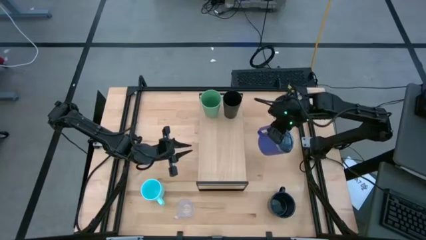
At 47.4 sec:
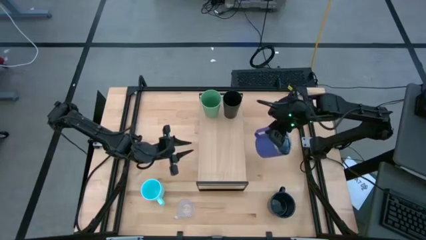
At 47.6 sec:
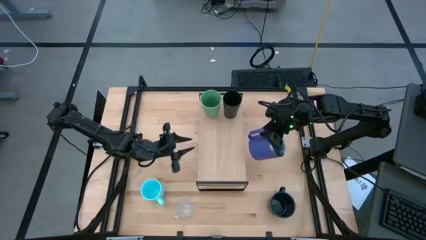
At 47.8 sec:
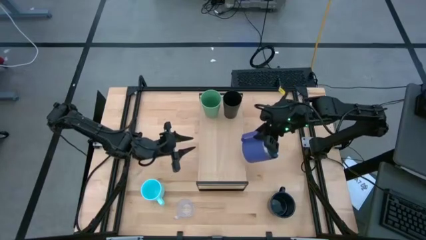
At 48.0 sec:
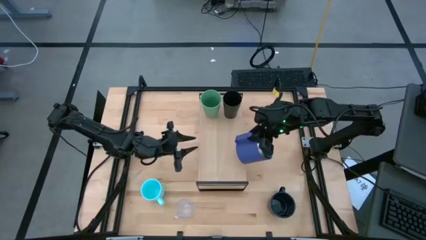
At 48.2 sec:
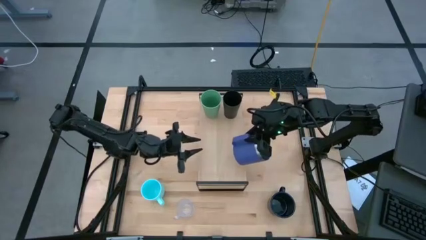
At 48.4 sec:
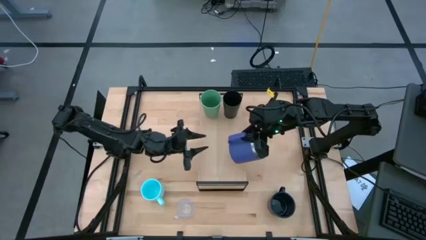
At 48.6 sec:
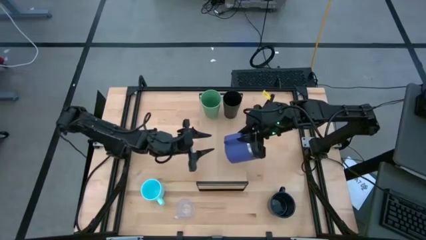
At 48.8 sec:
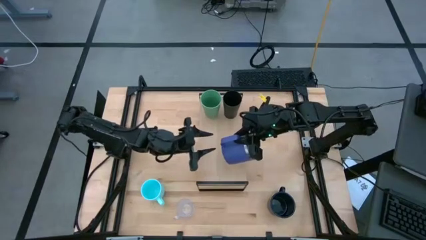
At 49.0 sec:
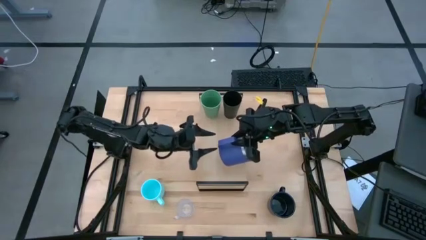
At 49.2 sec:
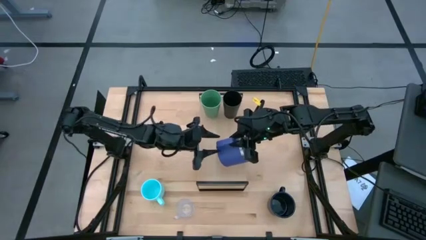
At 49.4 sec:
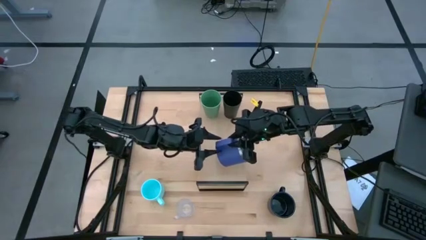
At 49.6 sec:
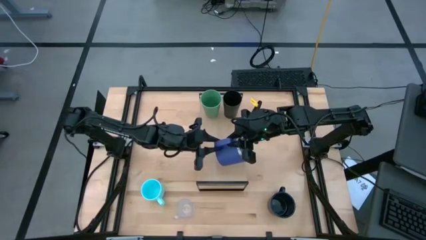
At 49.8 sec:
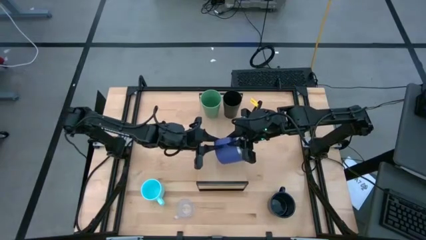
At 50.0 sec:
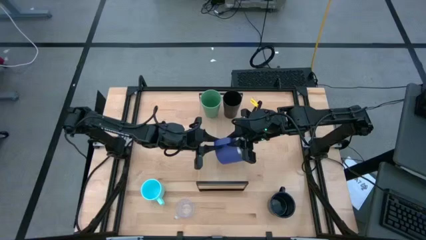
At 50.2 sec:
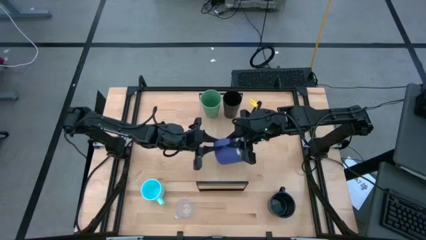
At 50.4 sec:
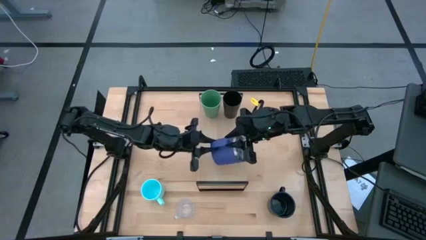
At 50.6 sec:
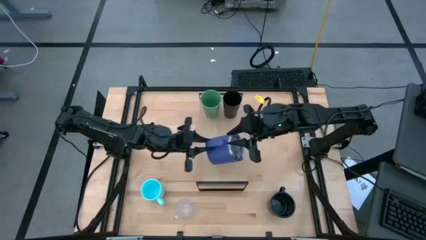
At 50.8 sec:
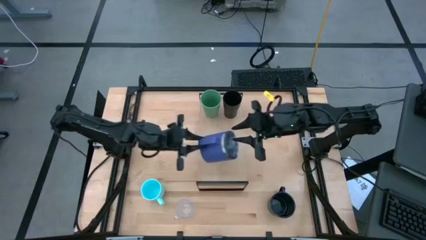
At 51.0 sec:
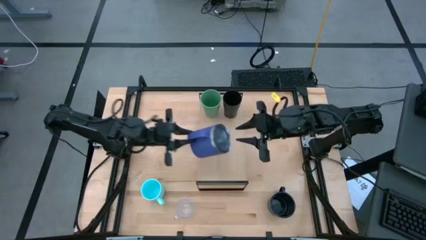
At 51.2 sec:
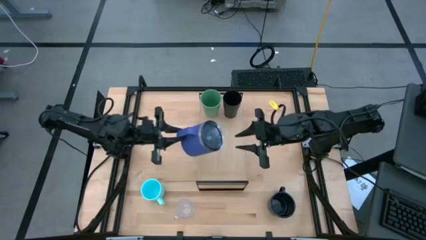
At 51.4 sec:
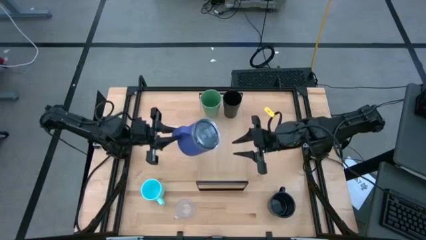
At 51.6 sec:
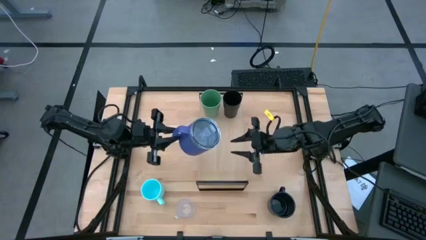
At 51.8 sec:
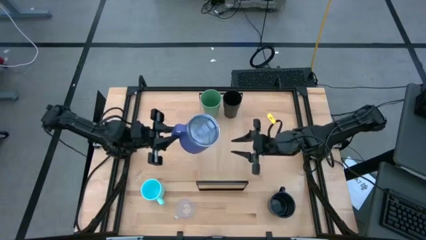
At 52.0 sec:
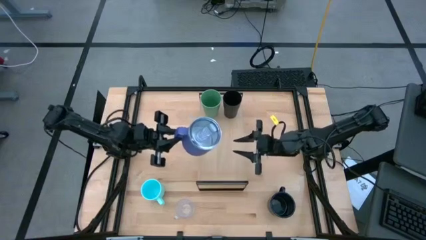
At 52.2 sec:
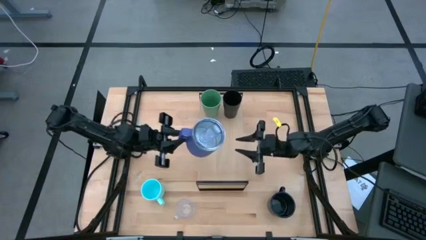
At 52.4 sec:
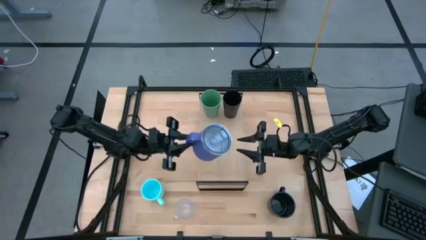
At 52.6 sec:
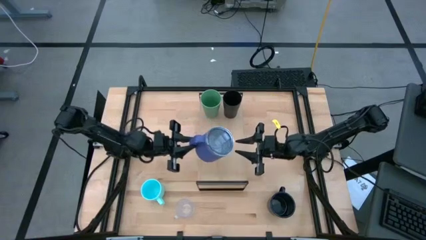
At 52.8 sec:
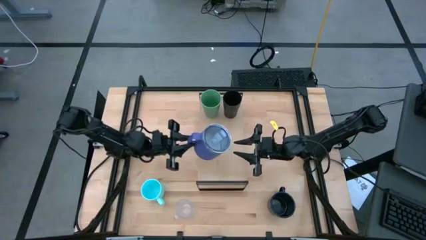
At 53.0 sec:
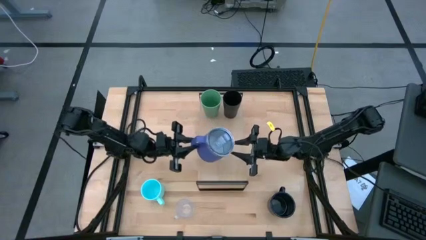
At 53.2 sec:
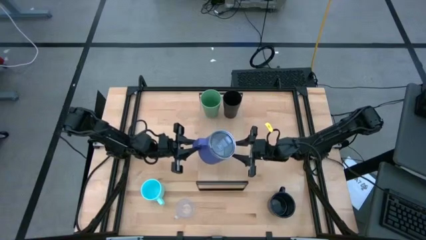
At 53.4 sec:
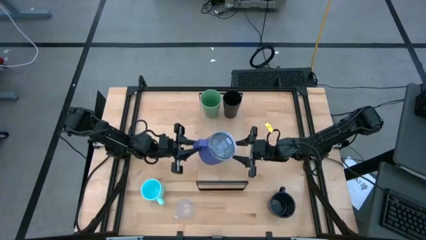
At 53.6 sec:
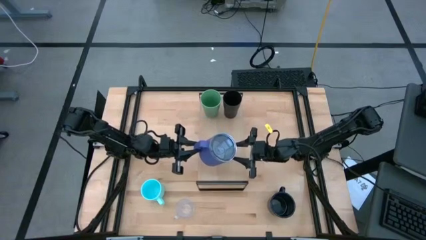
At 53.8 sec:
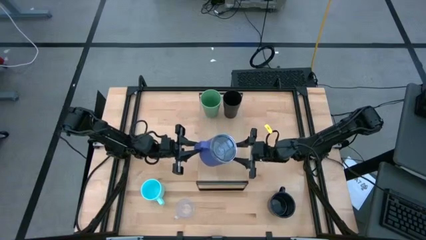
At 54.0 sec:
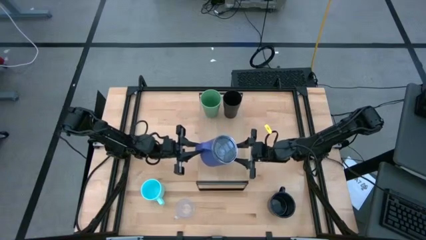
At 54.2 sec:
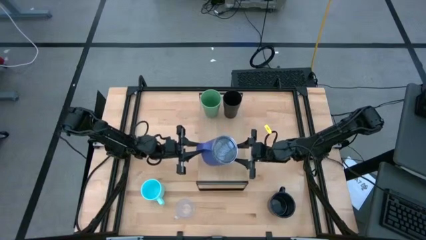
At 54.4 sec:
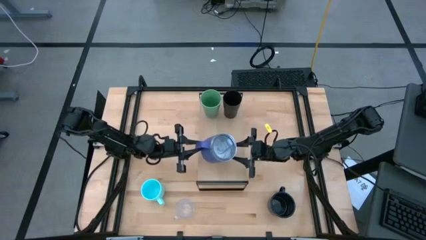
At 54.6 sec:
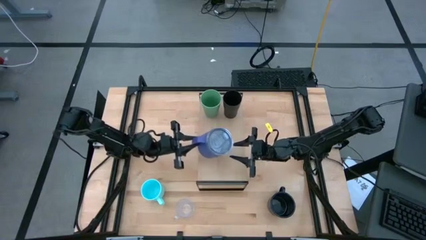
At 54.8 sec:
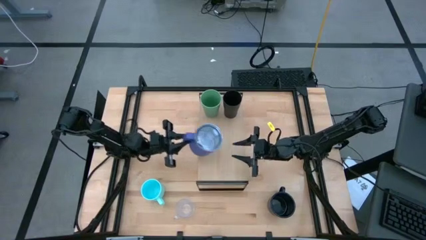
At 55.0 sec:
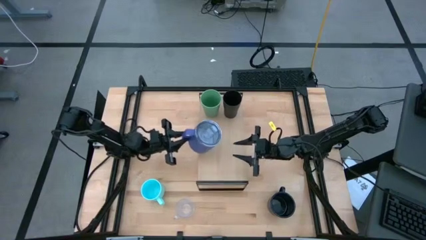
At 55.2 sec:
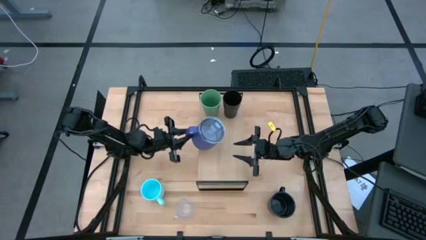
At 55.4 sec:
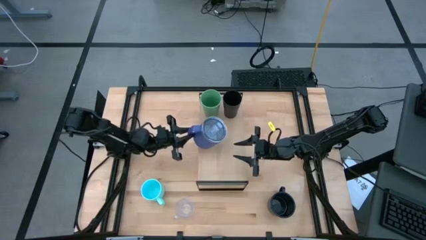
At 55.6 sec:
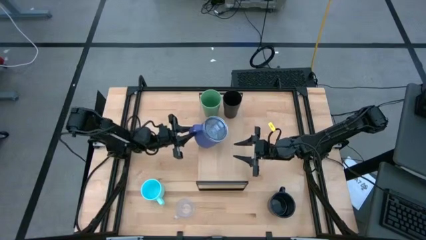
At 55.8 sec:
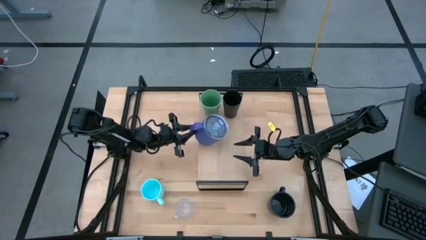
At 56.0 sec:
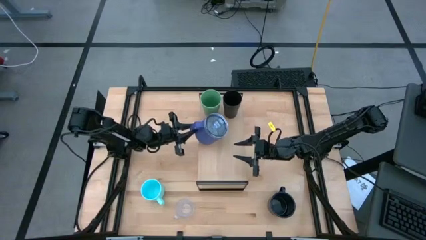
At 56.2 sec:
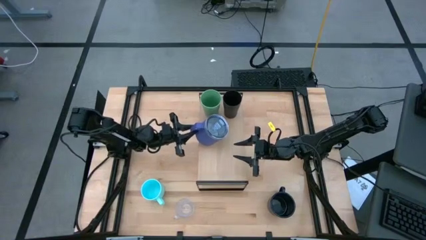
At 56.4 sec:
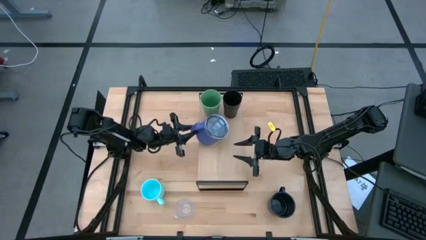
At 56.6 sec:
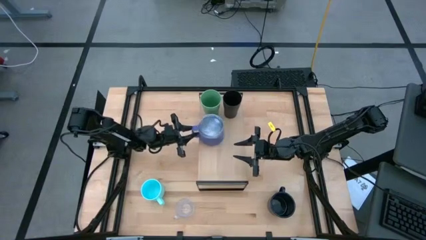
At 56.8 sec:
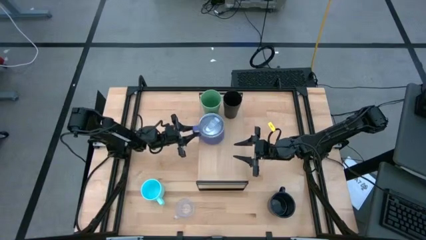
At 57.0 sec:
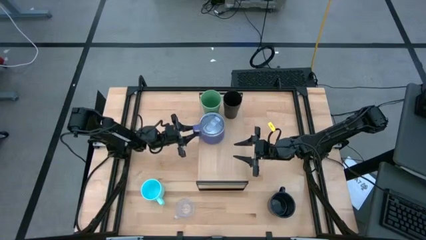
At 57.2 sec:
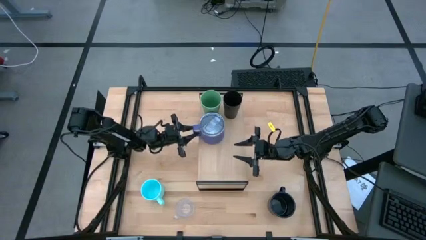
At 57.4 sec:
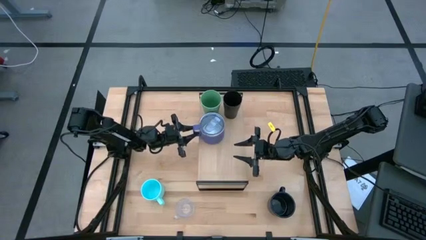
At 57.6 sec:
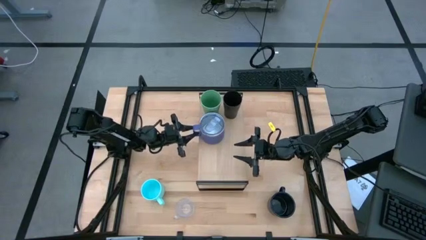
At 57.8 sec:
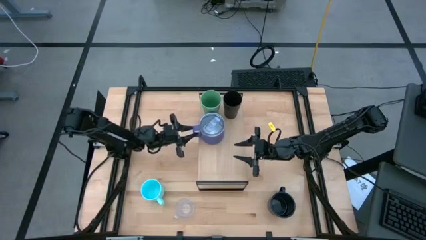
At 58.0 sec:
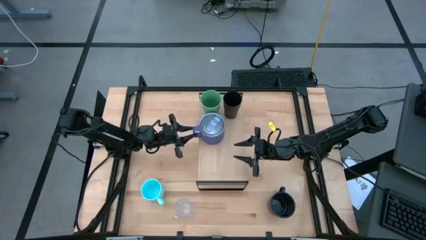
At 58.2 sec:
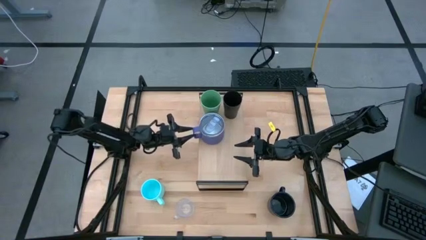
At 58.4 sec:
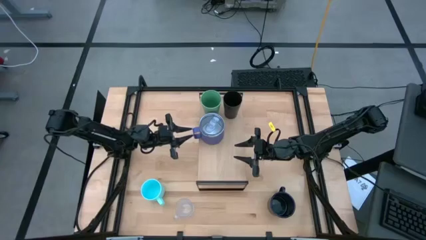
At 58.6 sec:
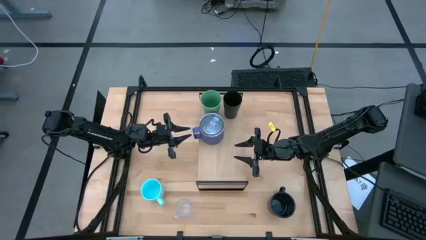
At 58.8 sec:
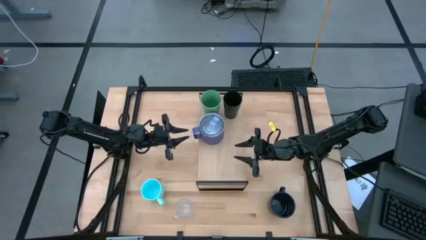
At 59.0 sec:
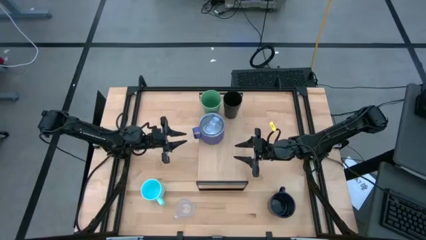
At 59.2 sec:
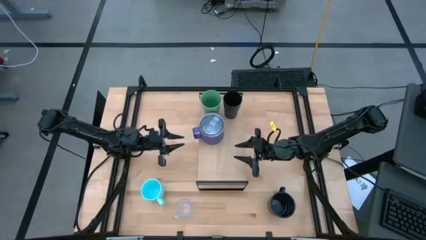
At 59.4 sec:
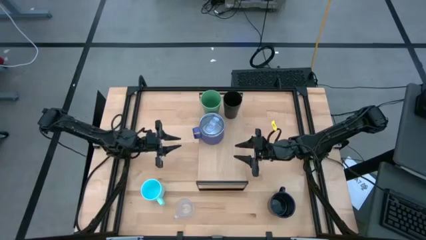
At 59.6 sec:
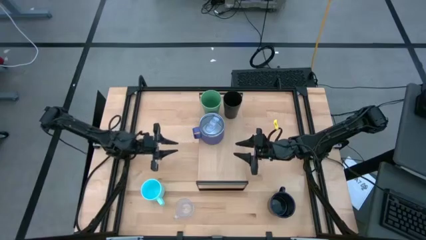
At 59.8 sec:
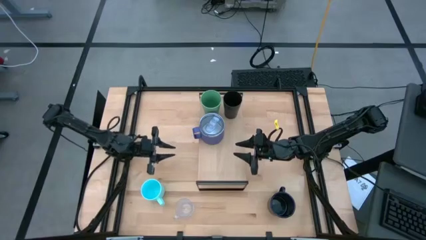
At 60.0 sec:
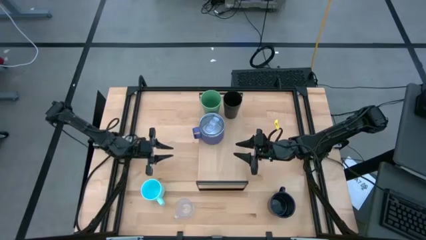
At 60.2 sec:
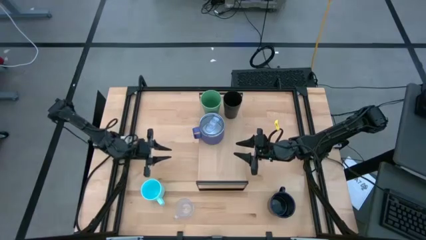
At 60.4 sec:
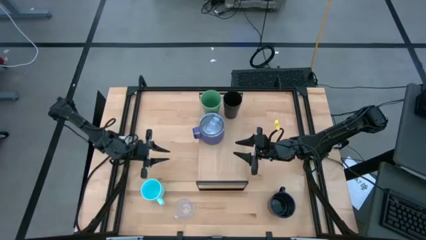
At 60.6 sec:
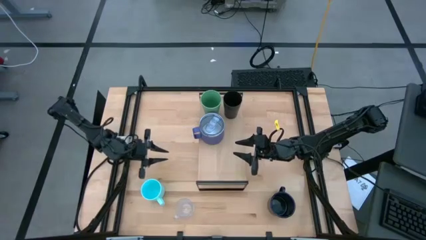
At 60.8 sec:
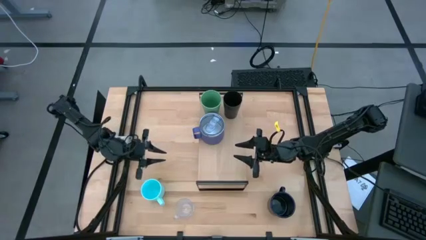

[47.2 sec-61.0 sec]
Task: Stack small to large cups/mugs on shelf
Put the purple mug on the shelf

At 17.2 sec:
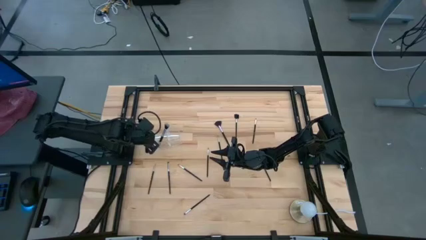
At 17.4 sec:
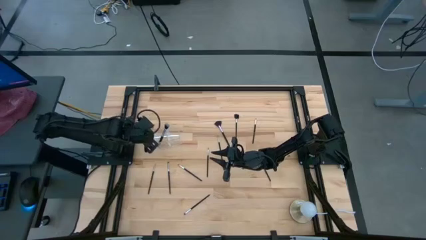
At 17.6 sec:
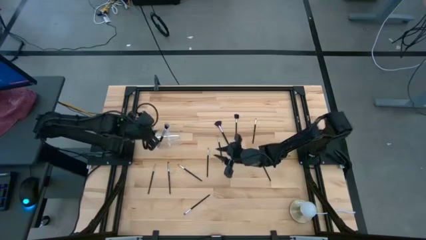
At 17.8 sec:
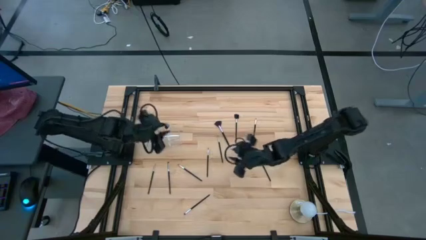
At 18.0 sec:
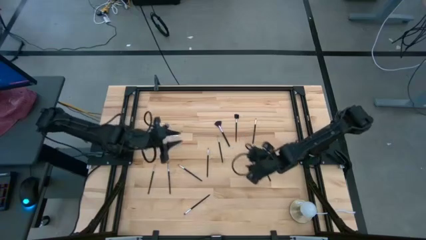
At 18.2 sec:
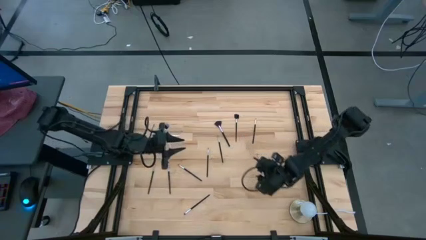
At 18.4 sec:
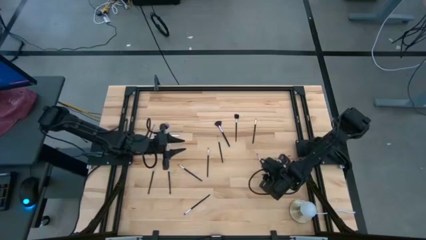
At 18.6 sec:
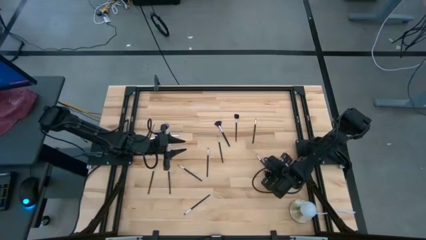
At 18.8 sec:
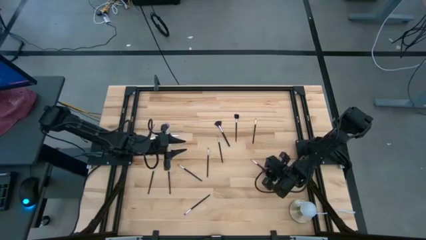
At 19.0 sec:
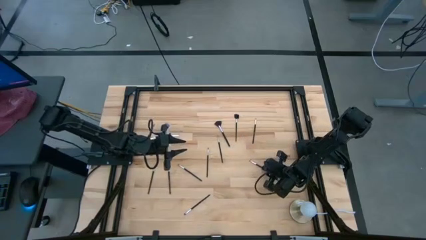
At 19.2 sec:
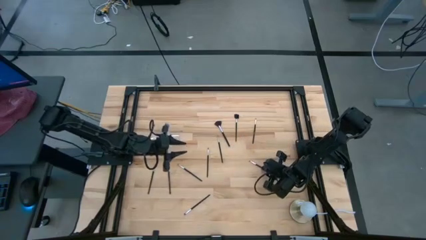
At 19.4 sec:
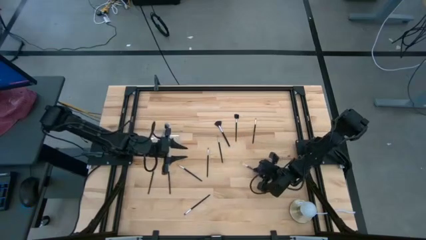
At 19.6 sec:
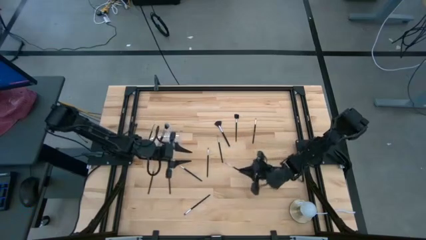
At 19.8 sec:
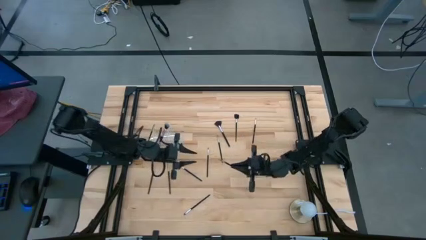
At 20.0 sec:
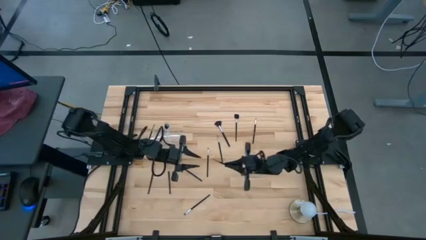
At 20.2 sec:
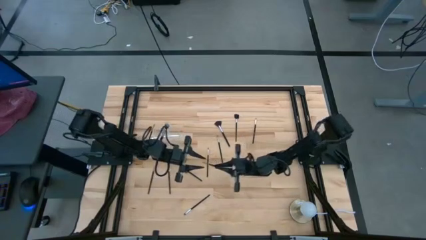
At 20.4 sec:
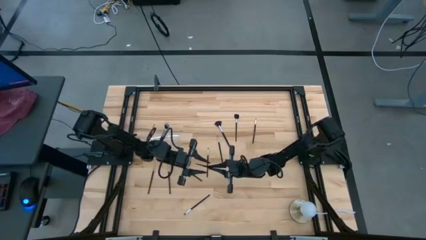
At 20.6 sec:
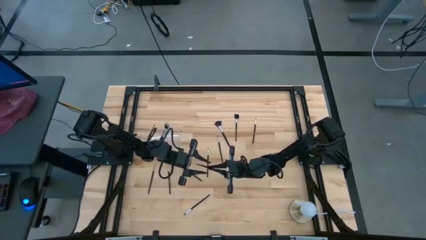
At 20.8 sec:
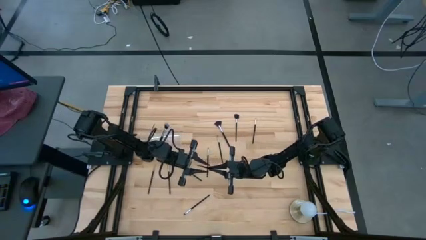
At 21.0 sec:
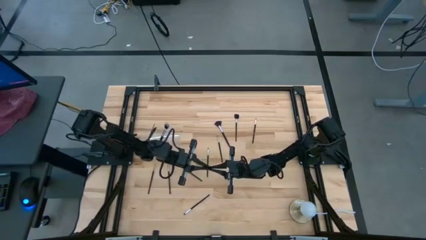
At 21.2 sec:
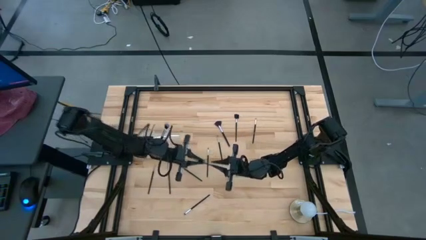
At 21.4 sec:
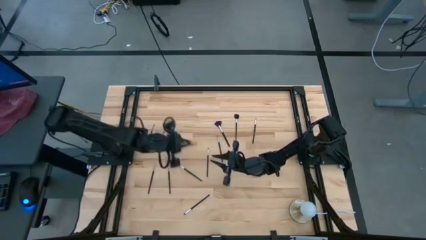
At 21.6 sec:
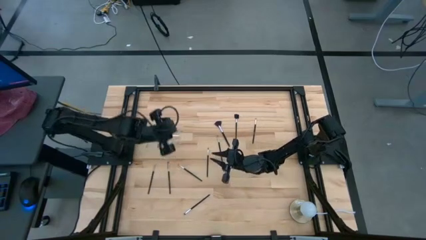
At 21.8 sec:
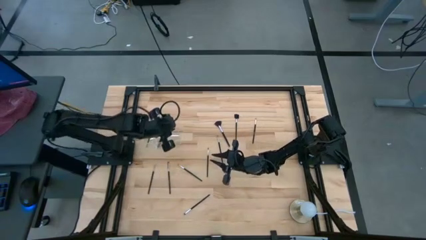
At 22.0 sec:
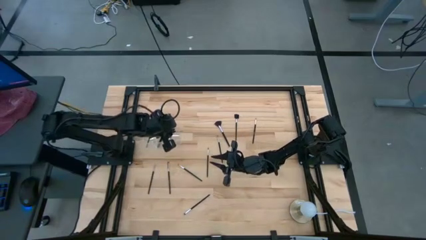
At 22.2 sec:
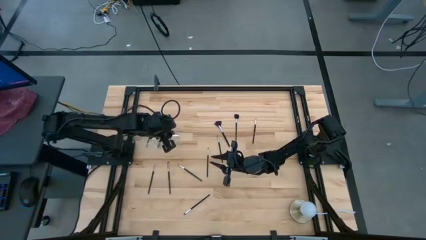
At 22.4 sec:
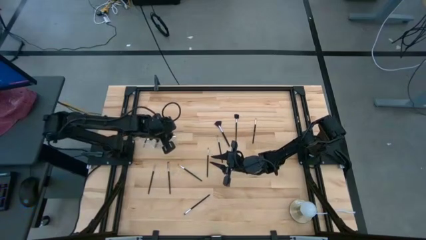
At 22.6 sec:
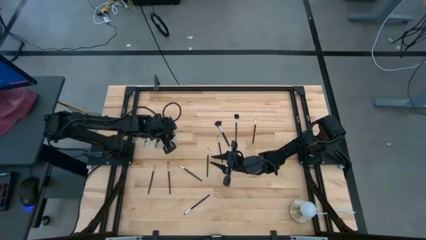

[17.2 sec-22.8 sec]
Task: Put items in baskets/containers
Put the black eyeshadow brush into the transparent organizer
